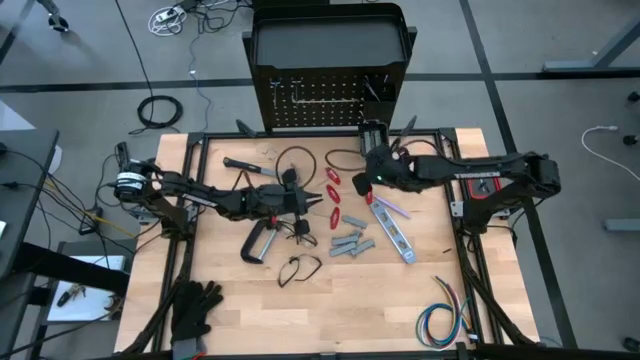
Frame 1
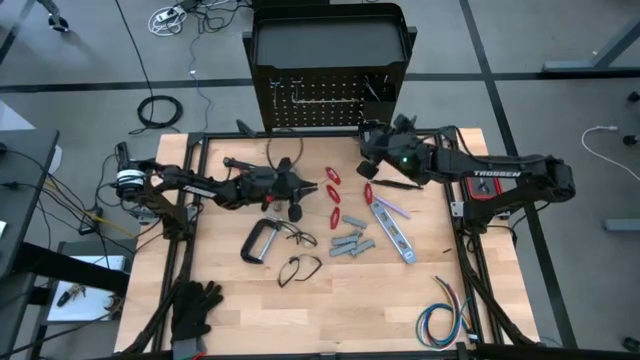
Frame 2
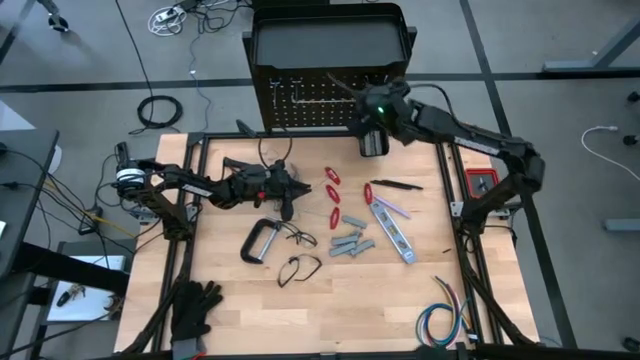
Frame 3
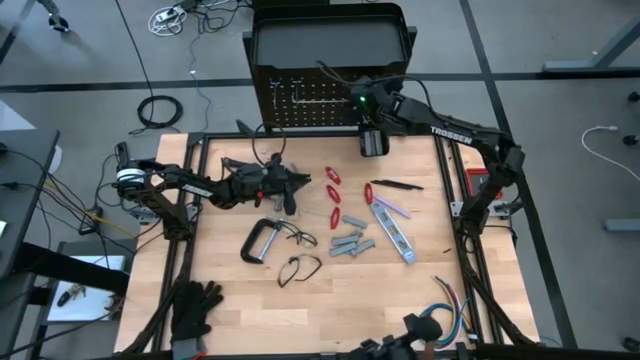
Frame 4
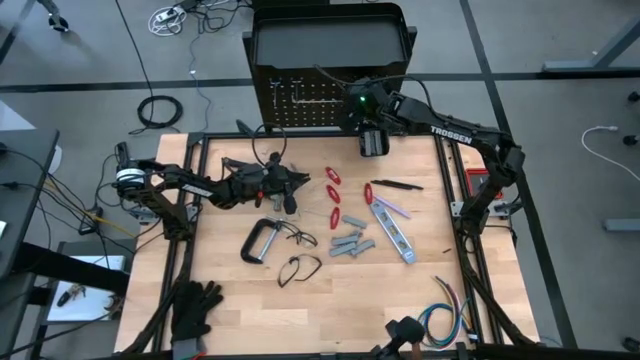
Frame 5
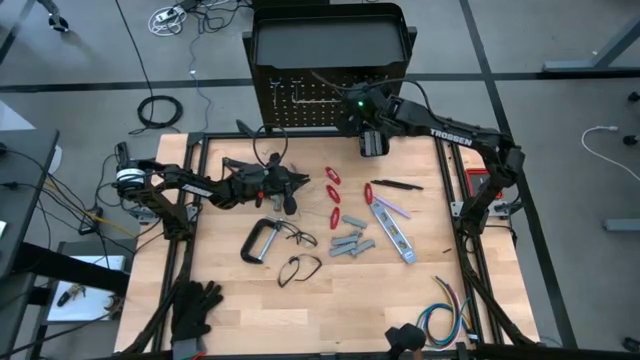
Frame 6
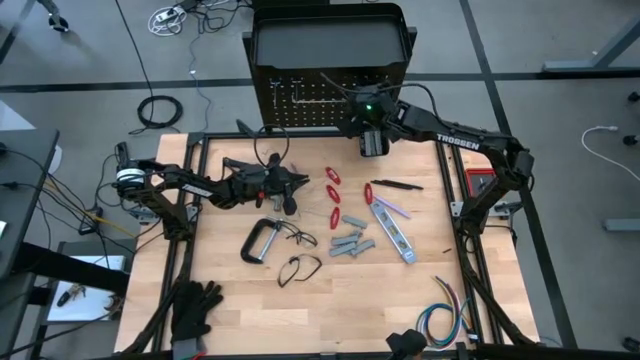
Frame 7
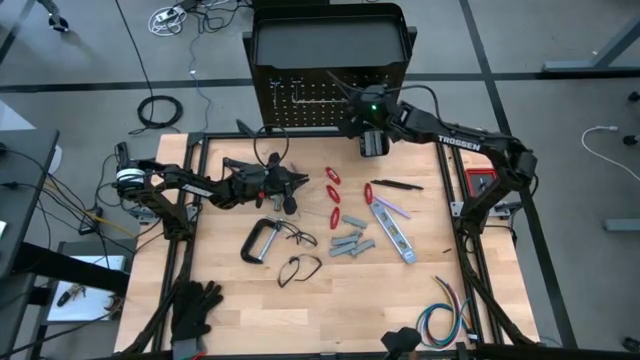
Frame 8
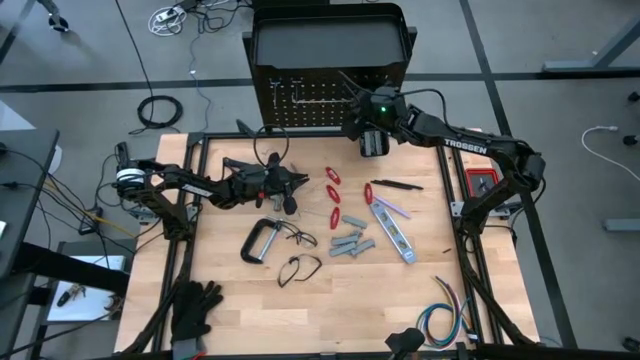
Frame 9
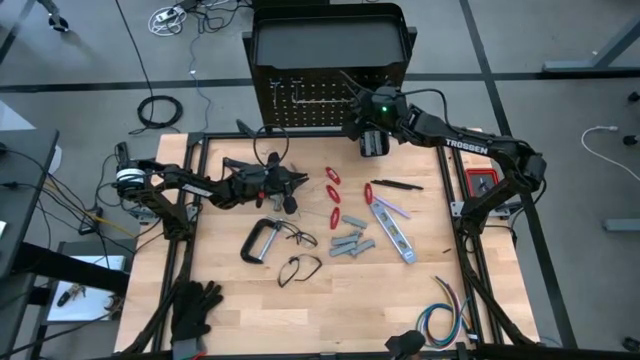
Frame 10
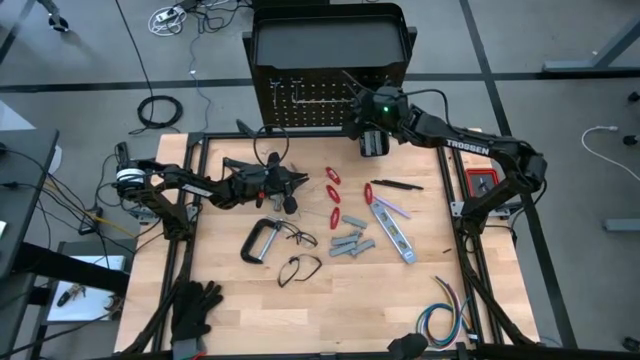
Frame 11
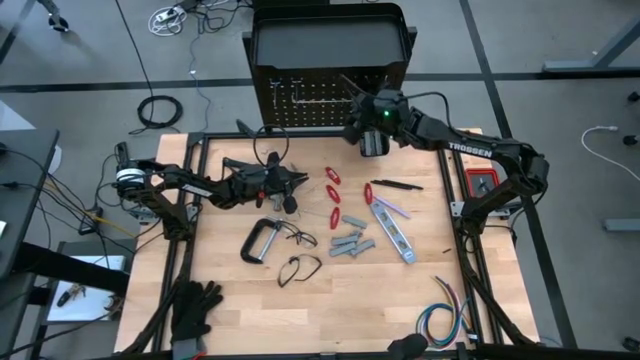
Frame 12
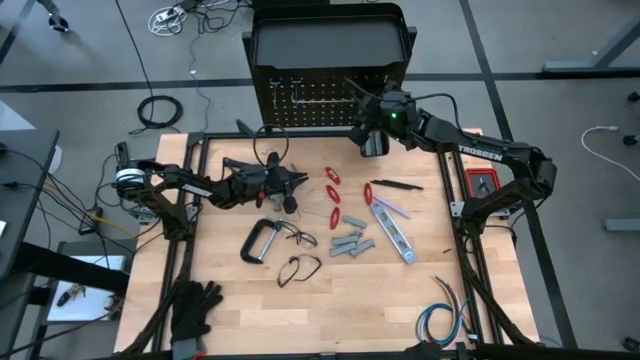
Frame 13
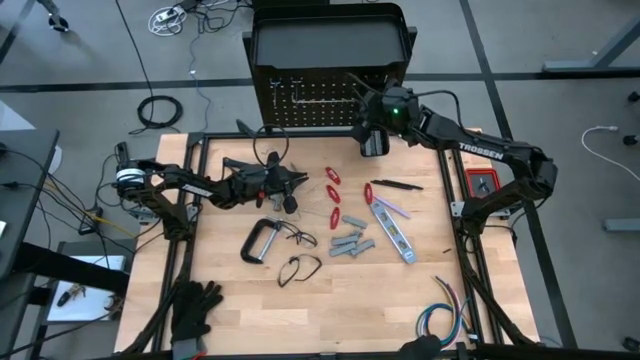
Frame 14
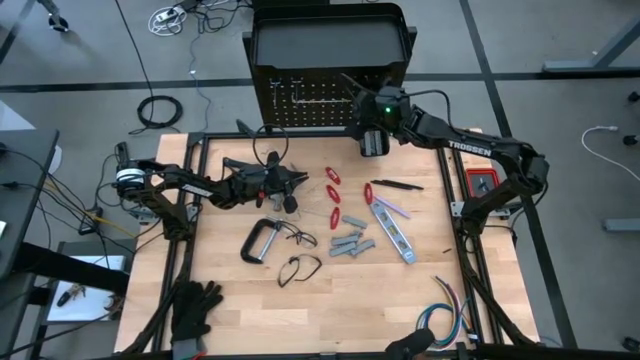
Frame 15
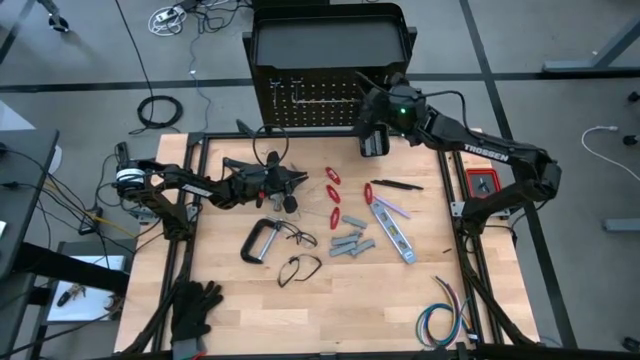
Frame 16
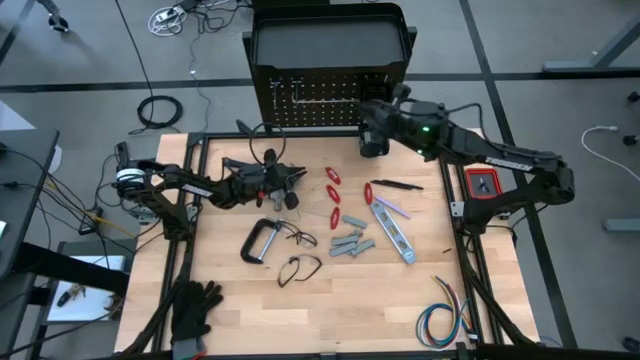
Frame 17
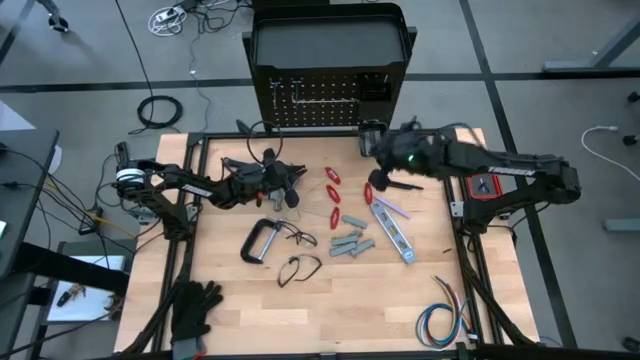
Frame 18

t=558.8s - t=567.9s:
Task: Hang tools onto peg board
Put the black pen on the table

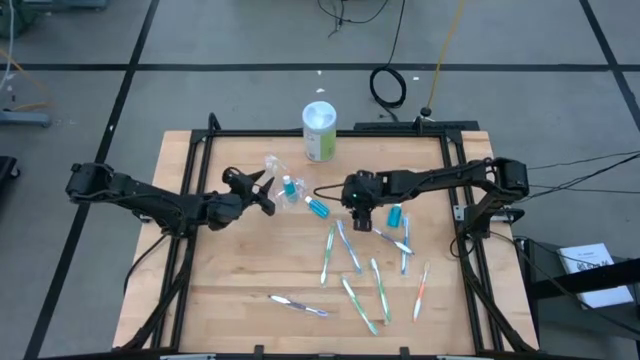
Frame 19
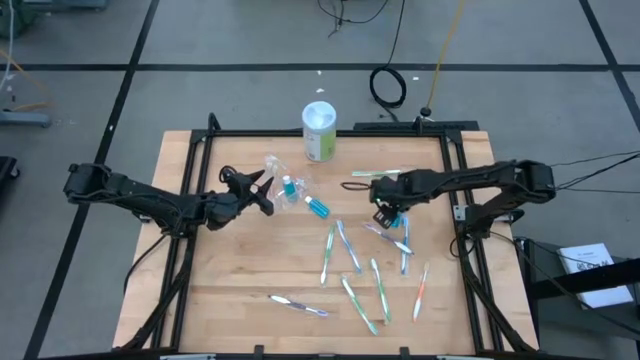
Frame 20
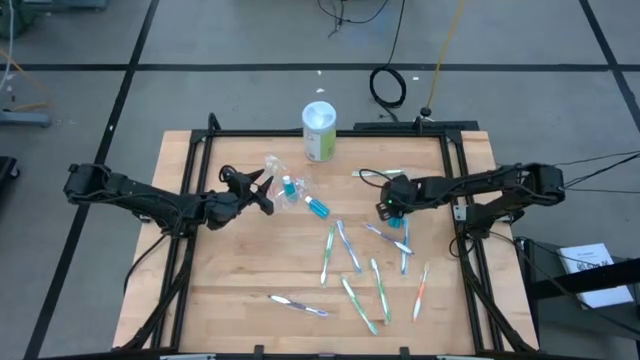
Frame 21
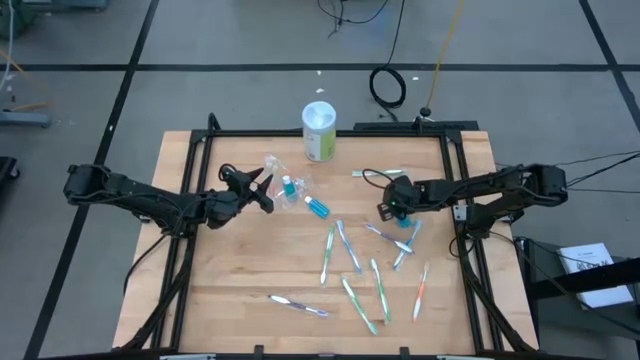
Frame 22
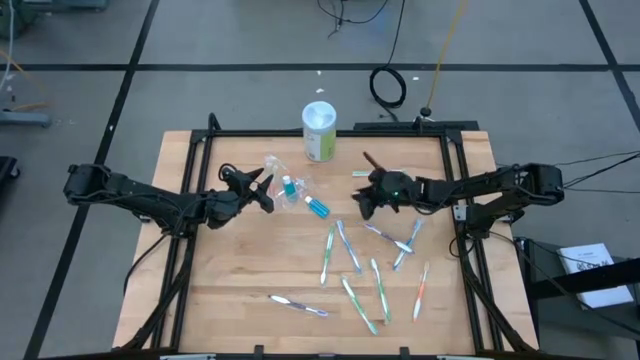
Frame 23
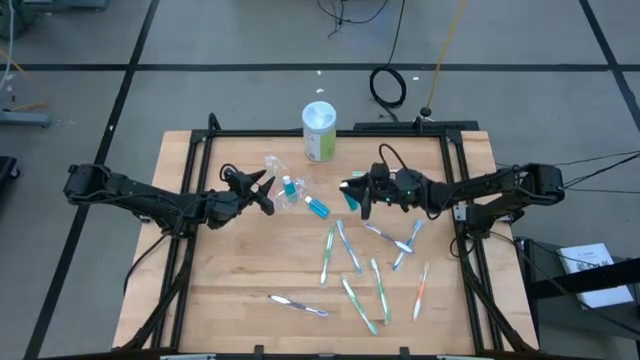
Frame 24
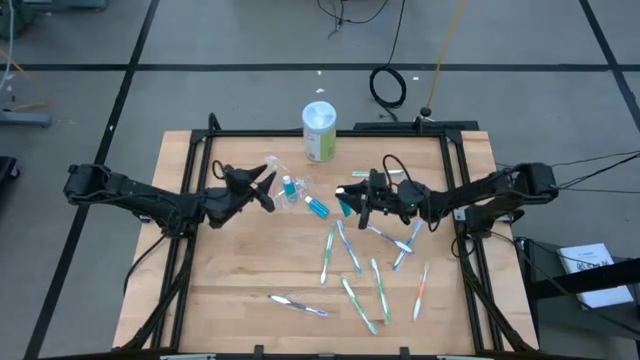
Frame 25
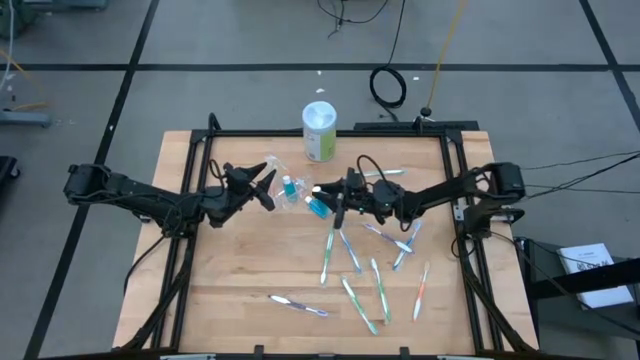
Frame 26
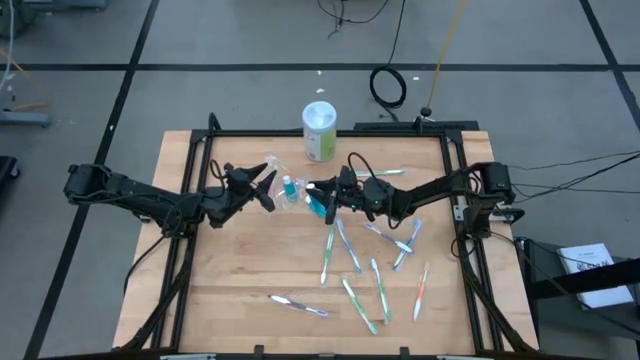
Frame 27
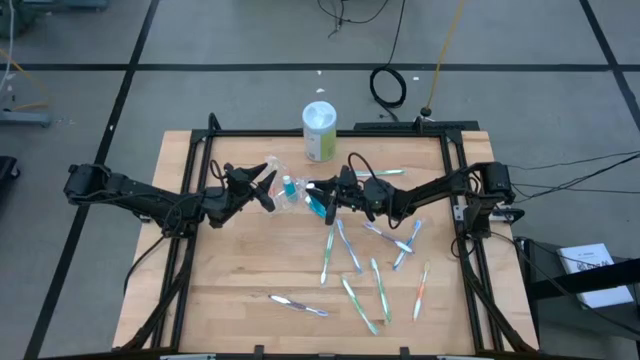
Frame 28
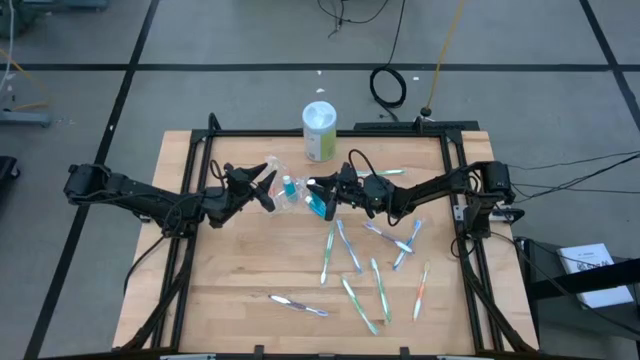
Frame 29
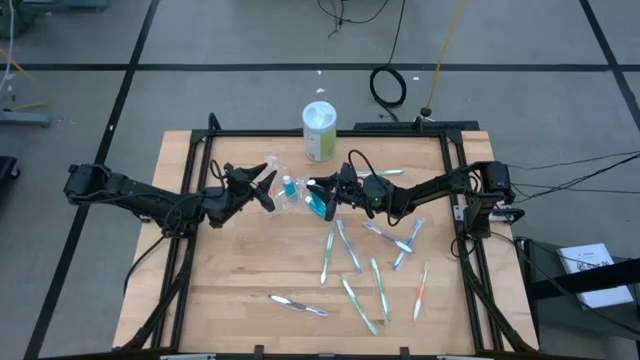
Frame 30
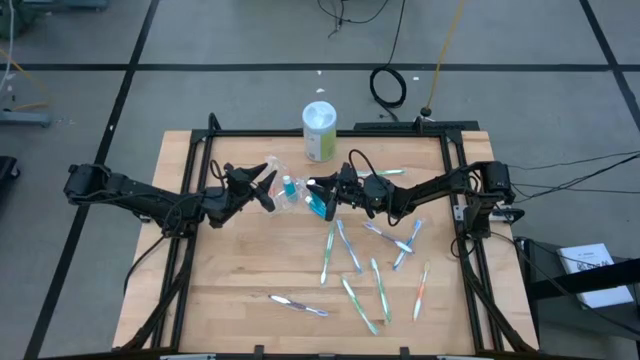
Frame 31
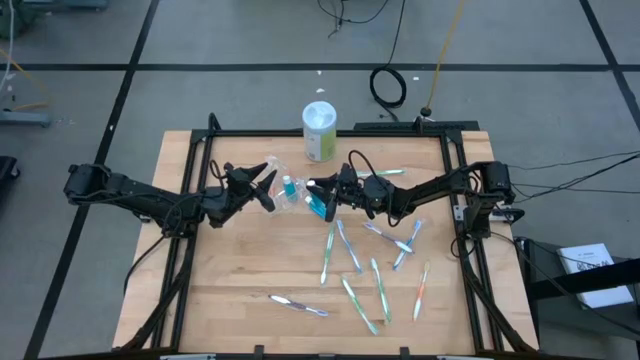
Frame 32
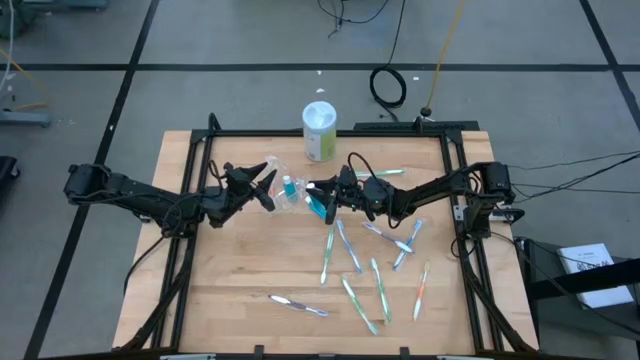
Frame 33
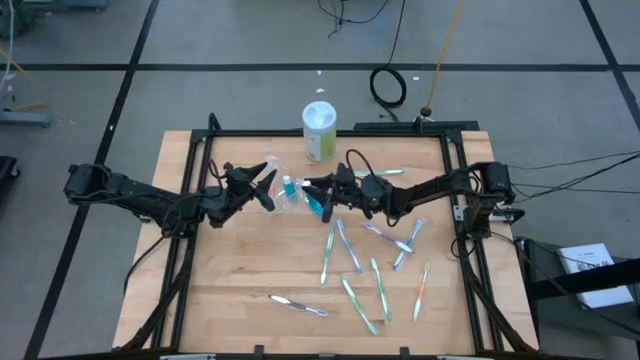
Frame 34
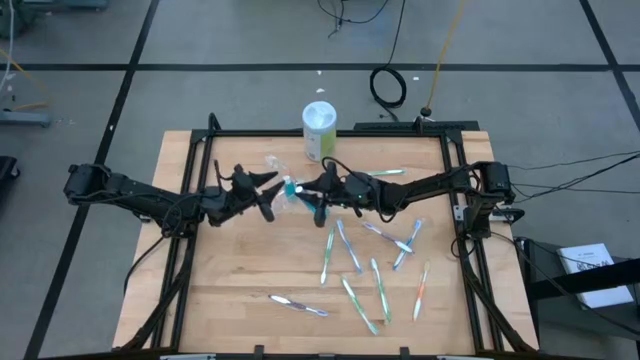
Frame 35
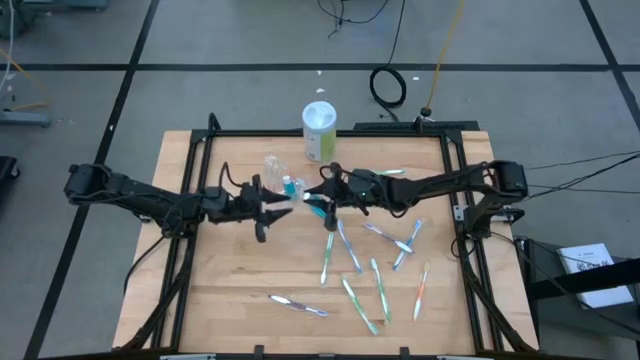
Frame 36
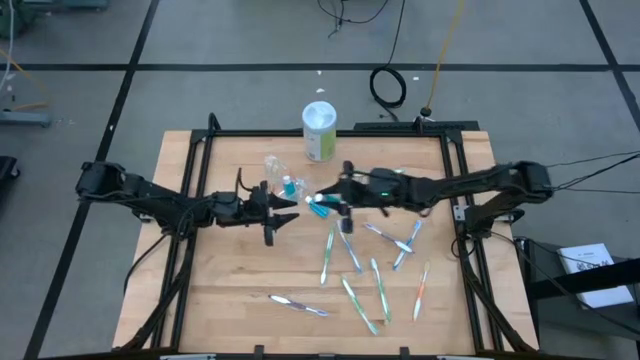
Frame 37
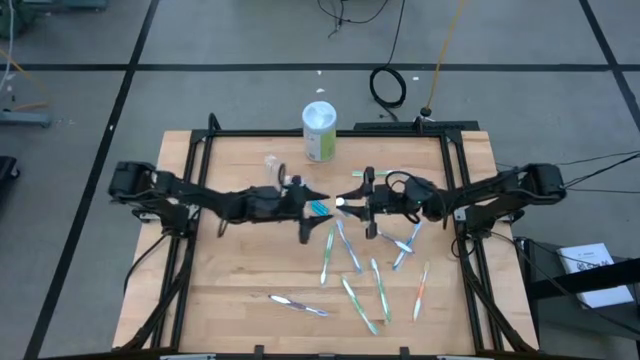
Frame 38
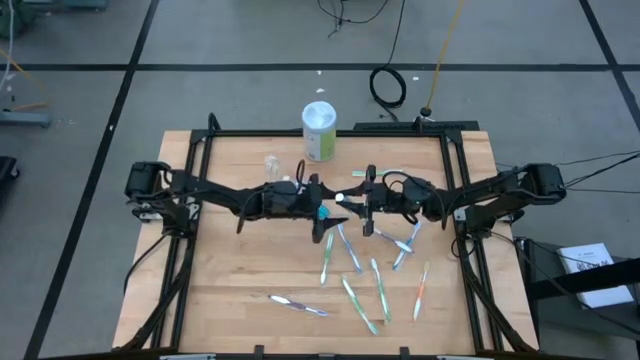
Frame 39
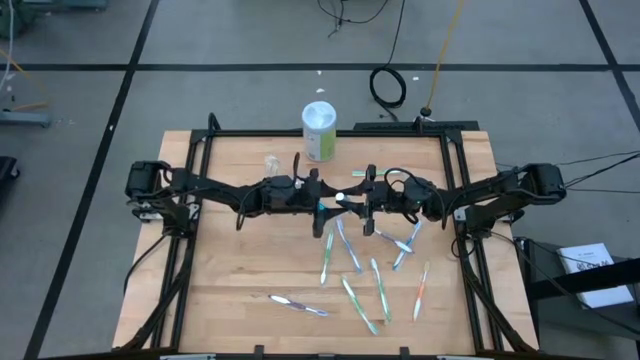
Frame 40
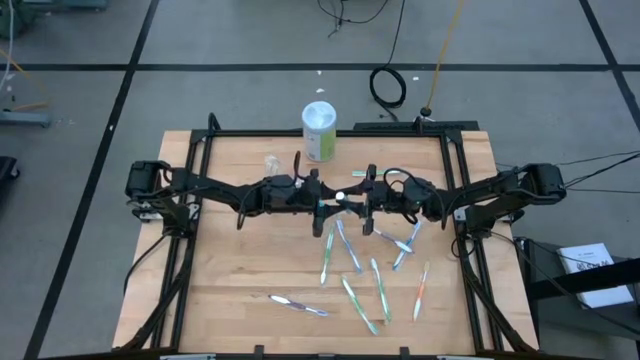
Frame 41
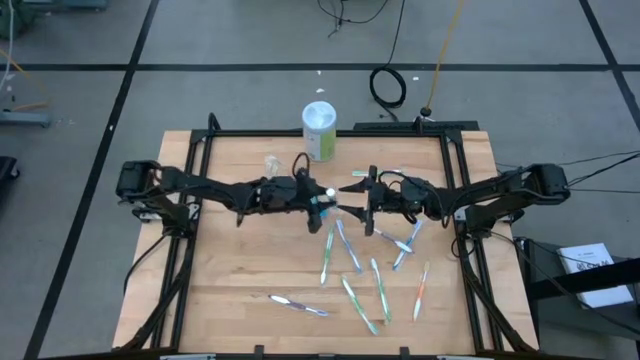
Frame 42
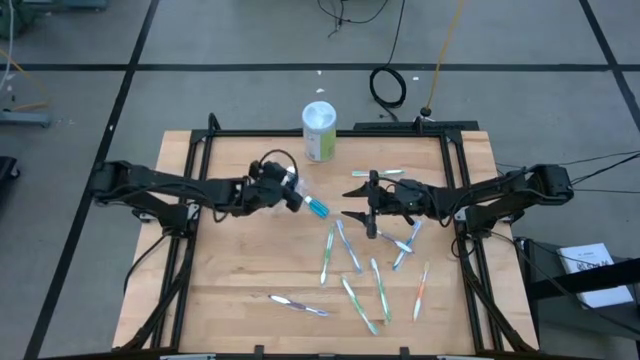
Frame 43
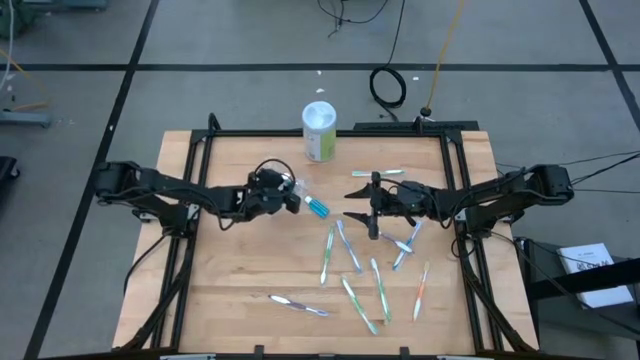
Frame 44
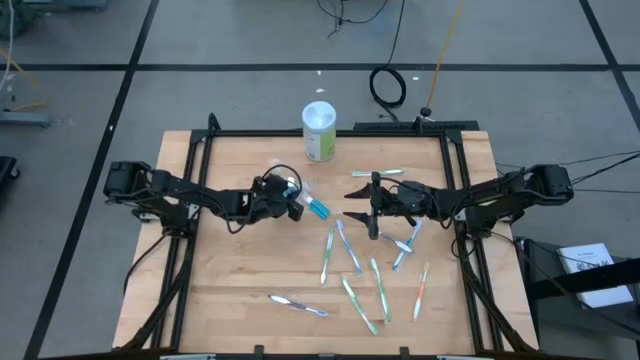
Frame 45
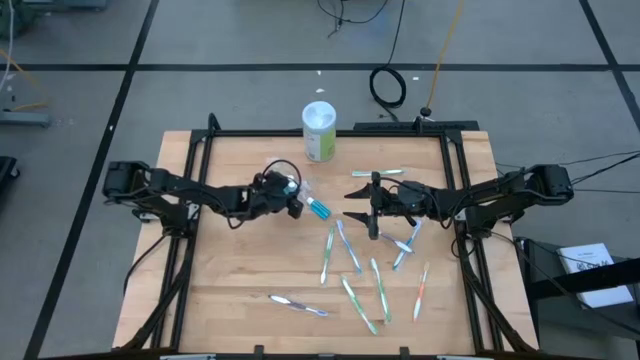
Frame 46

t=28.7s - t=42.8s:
Task: Pick & Place toothbrushing station
Put the blue mouthwash bottle into the transparent organizer
